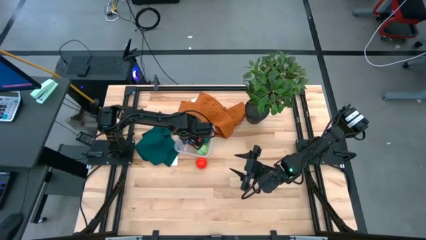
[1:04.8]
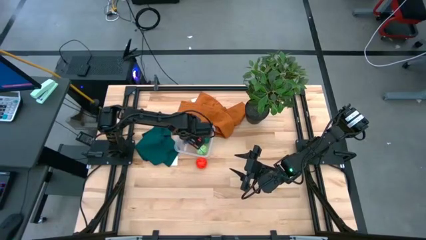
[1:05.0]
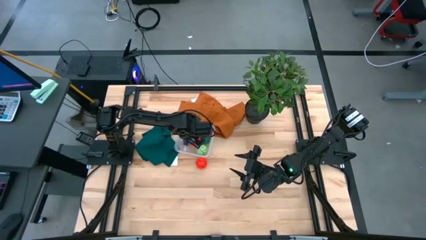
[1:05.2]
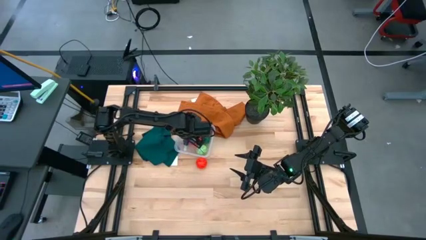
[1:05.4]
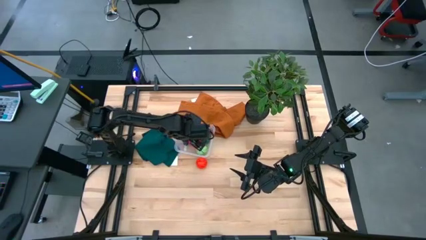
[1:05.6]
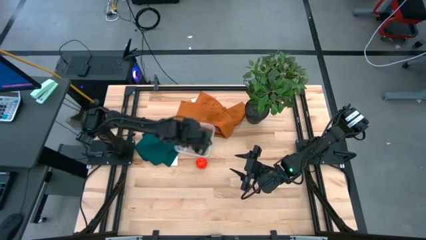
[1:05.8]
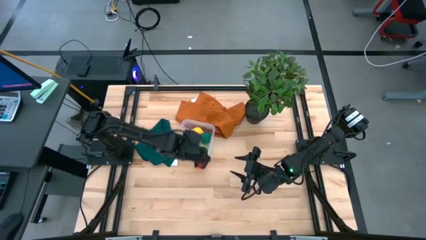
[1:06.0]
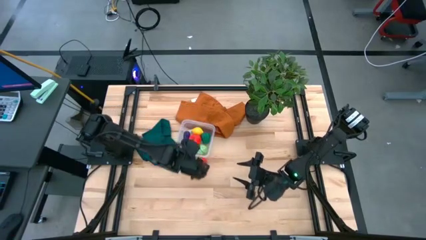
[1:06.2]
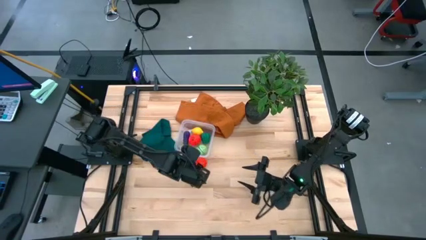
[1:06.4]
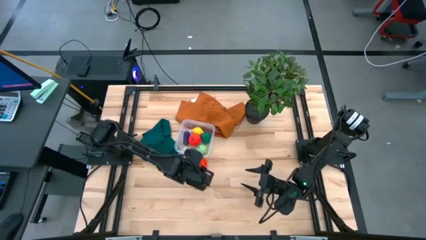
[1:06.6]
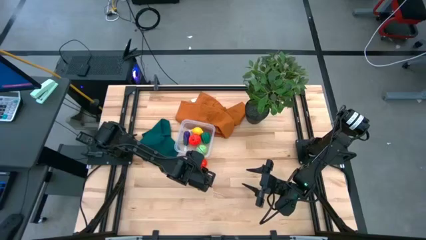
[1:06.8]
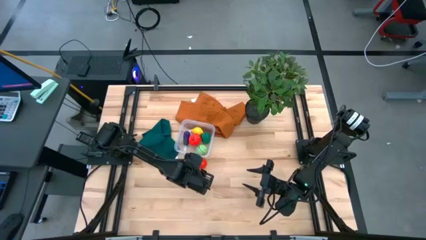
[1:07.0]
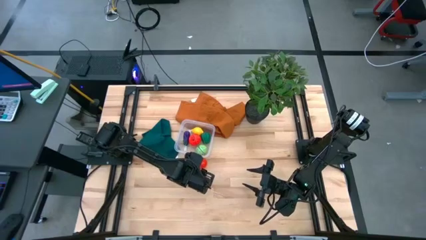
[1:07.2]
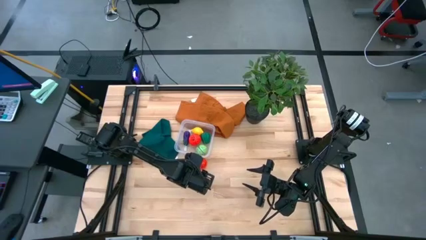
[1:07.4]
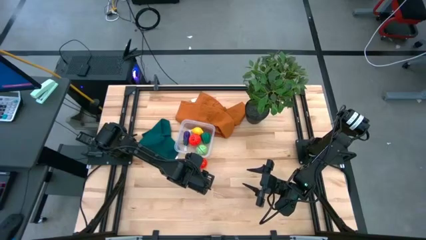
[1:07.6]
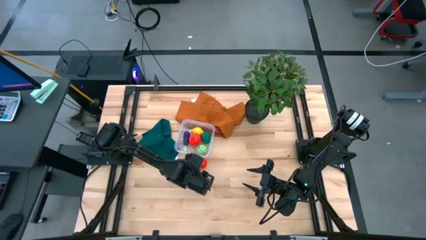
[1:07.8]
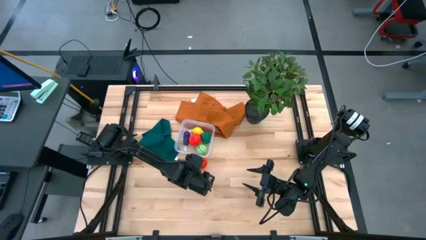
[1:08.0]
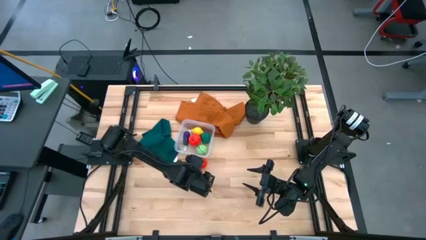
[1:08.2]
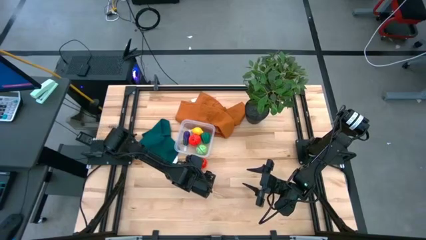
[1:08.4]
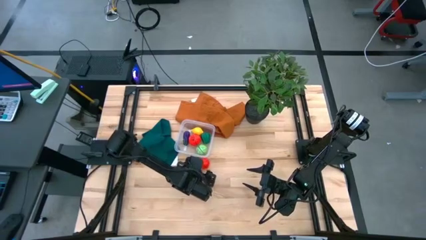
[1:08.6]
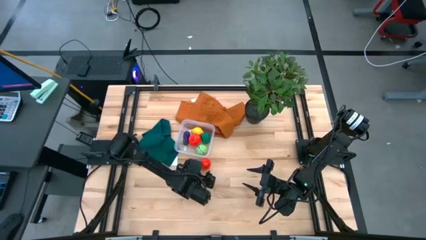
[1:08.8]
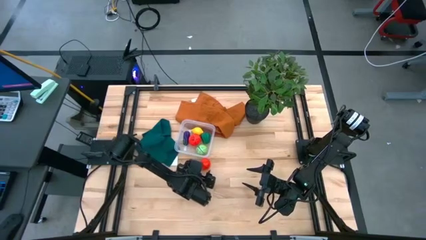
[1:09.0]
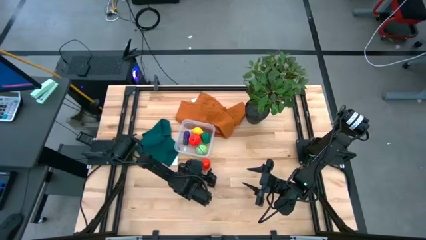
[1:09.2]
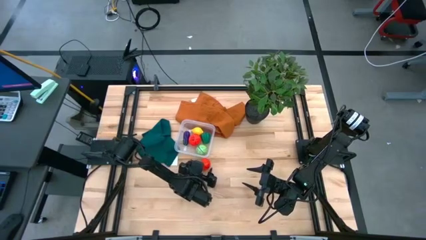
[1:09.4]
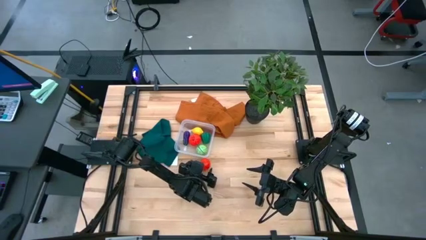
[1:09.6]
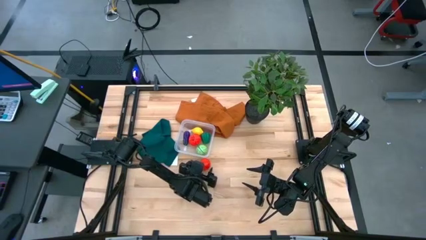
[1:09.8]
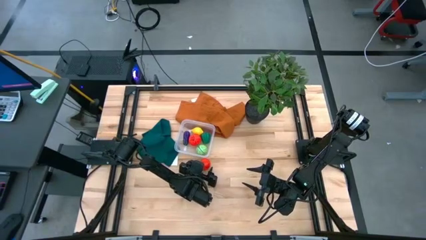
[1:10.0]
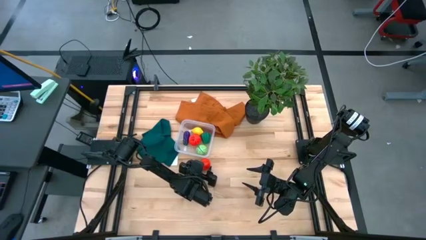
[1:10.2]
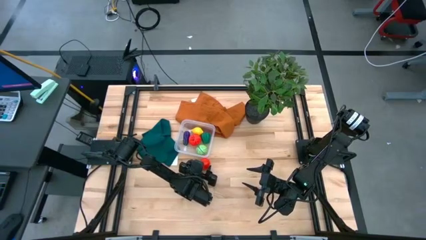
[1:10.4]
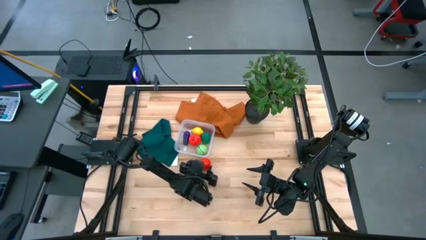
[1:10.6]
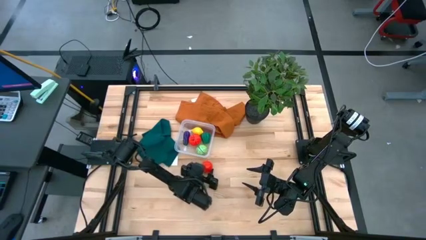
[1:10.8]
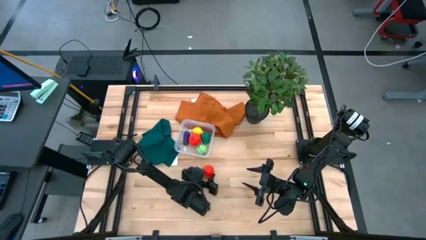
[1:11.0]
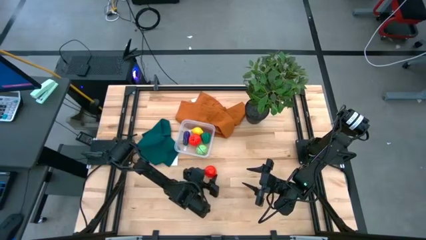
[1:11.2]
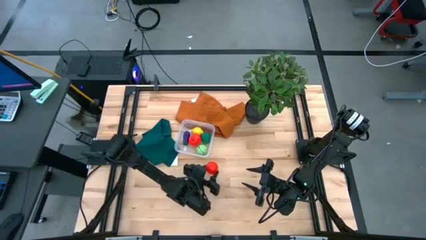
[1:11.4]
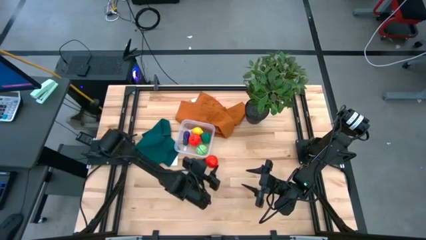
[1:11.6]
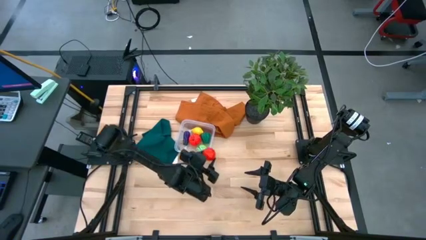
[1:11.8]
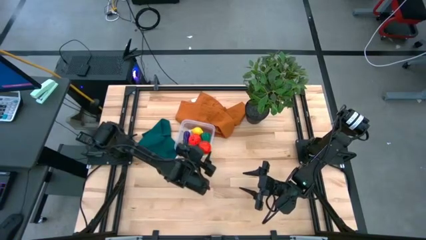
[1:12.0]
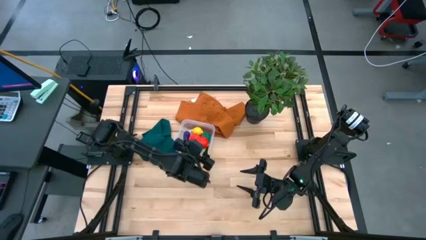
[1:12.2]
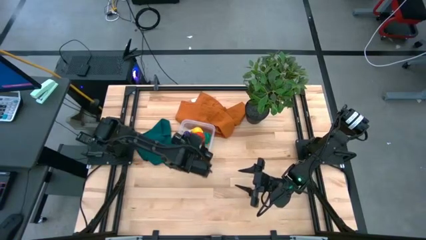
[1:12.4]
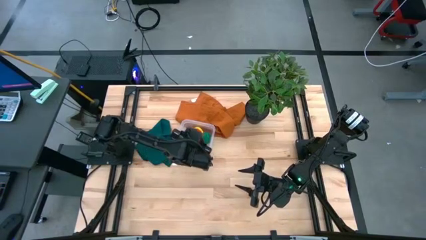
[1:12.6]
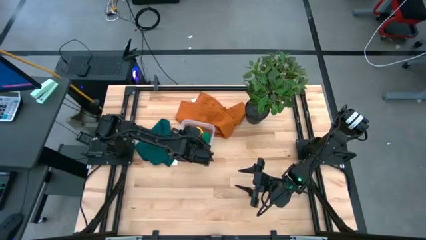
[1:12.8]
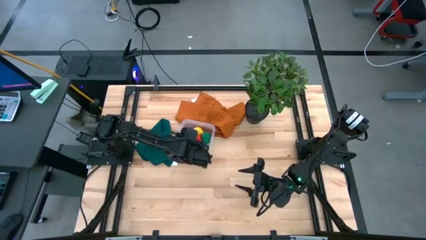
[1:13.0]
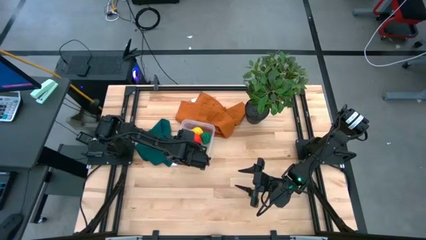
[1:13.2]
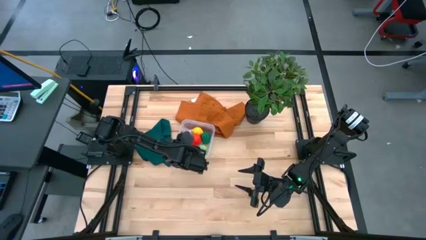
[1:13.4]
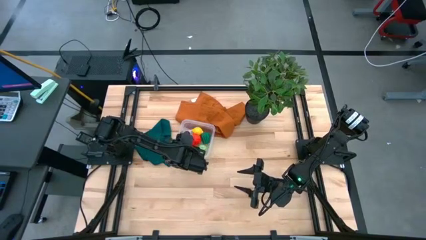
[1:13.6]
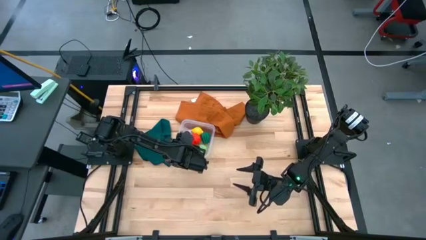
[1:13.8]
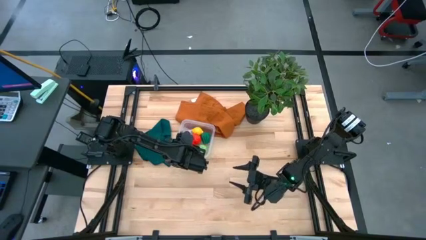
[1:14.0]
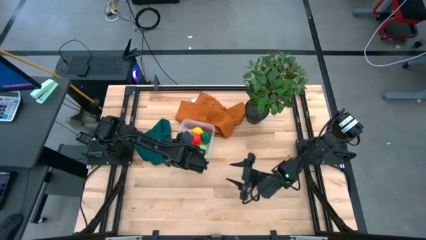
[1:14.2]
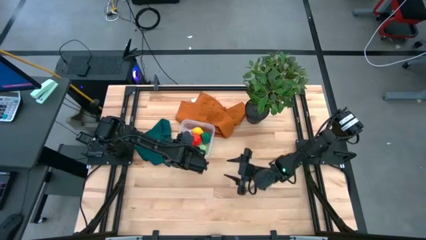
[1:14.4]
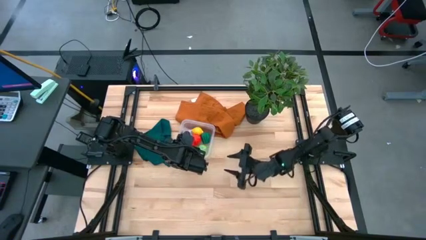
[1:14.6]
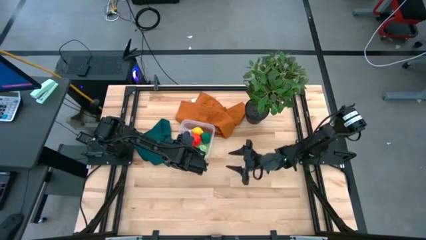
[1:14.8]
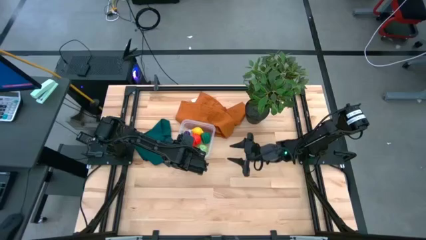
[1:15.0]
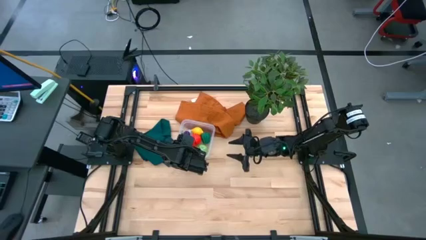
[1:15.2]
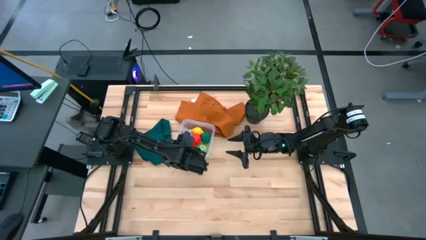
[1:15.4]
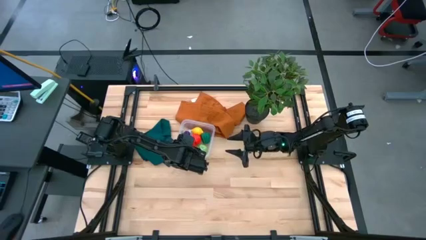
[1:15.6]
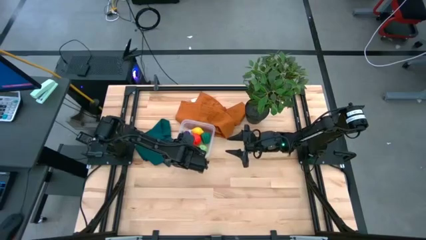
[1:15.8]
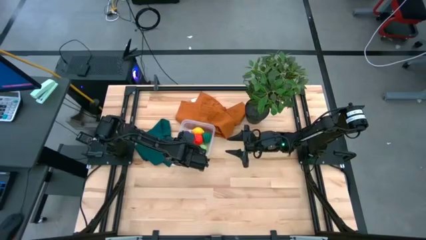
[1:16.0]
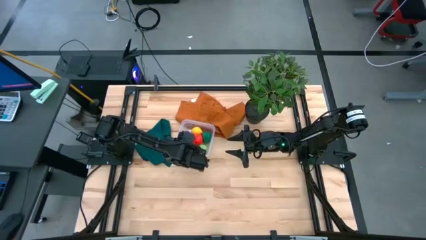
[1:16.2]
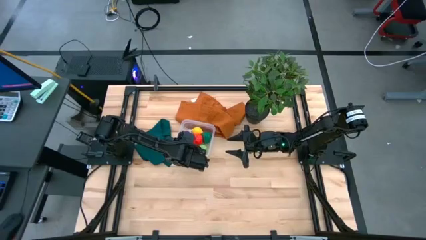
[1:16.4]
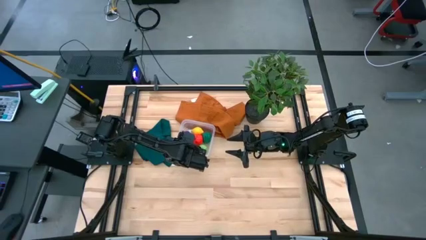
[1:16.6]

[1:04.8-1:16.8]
Task: Pick and placing Produce into tupperware
Put the red tomato into the transparent bin

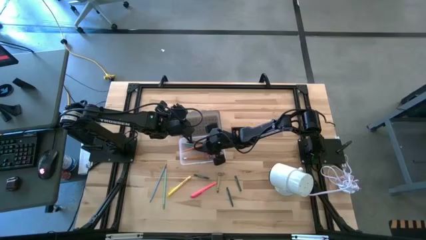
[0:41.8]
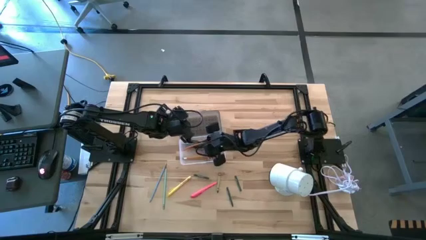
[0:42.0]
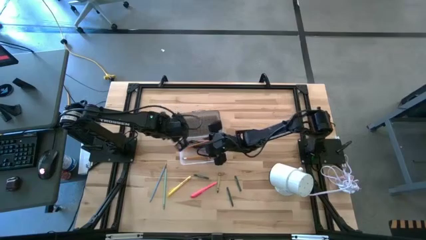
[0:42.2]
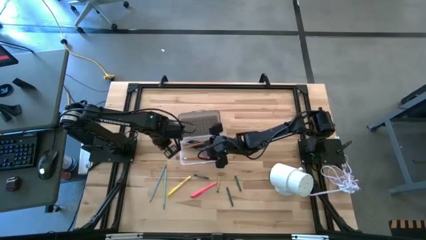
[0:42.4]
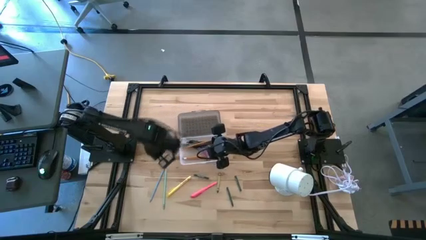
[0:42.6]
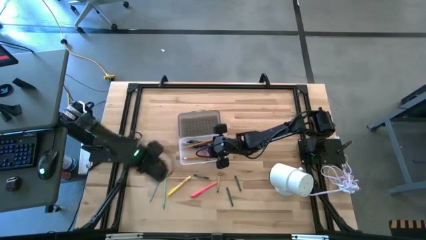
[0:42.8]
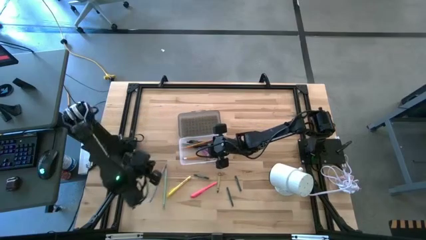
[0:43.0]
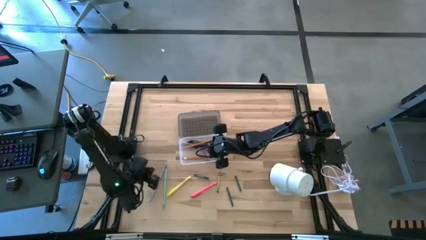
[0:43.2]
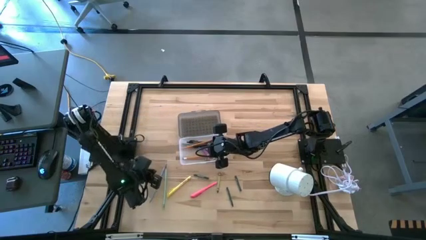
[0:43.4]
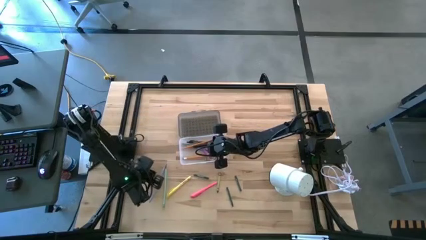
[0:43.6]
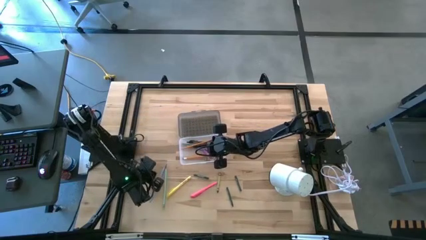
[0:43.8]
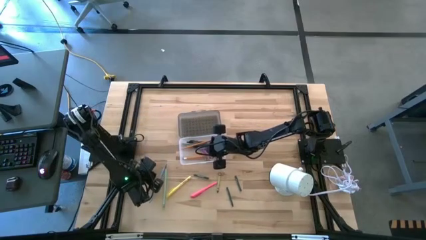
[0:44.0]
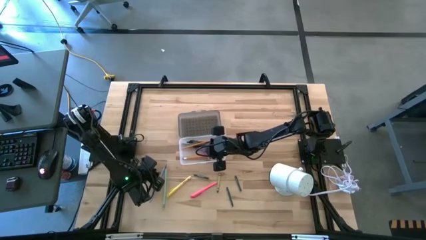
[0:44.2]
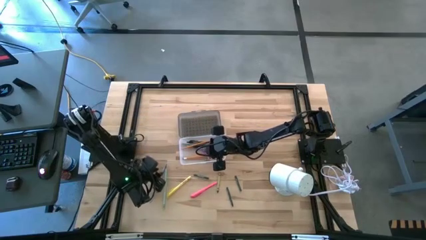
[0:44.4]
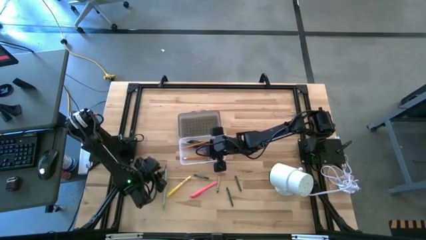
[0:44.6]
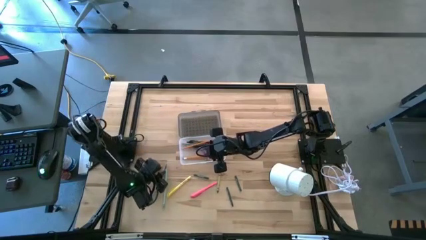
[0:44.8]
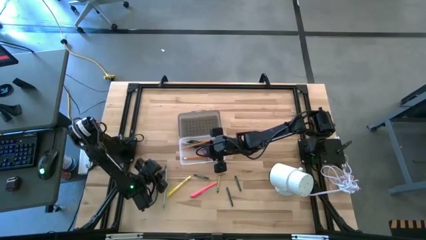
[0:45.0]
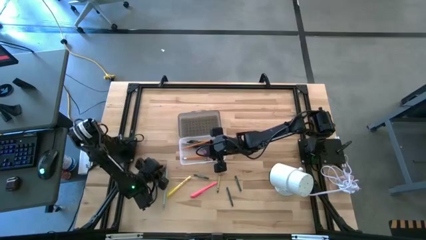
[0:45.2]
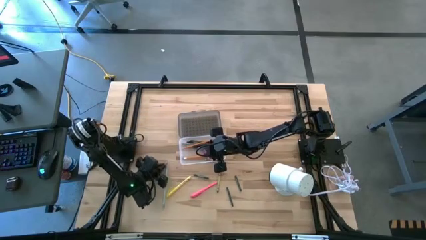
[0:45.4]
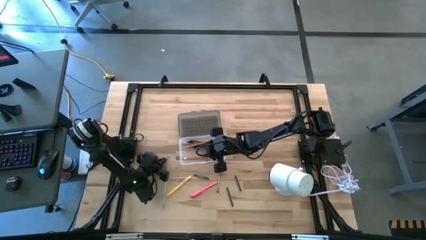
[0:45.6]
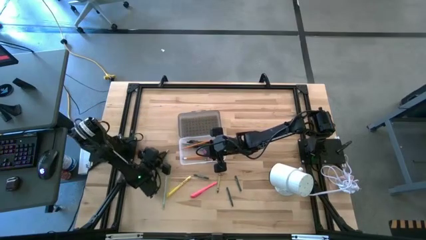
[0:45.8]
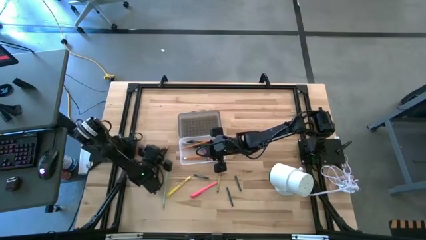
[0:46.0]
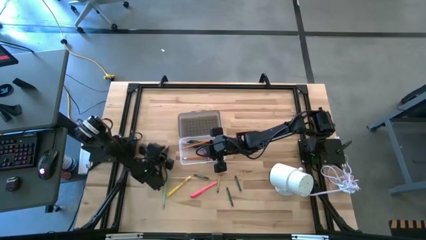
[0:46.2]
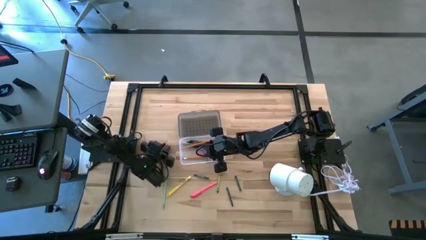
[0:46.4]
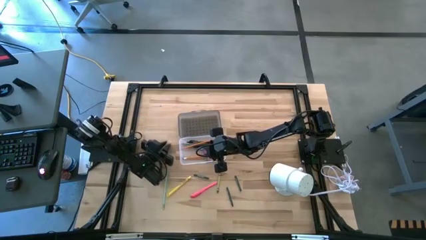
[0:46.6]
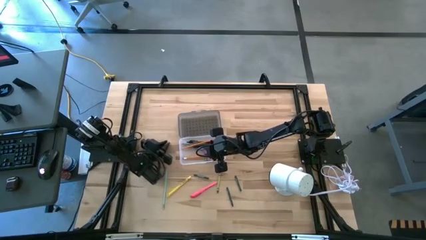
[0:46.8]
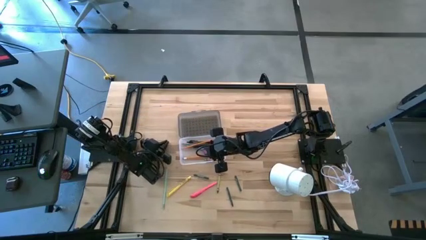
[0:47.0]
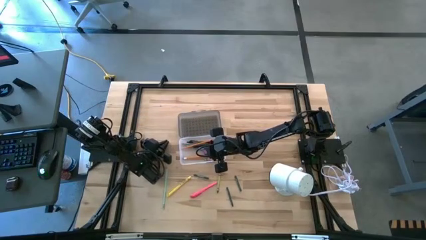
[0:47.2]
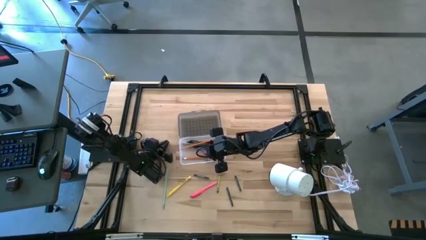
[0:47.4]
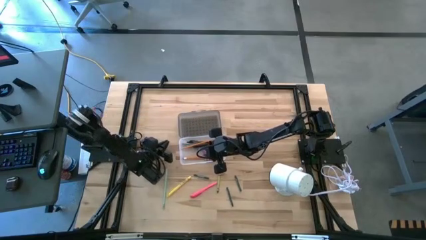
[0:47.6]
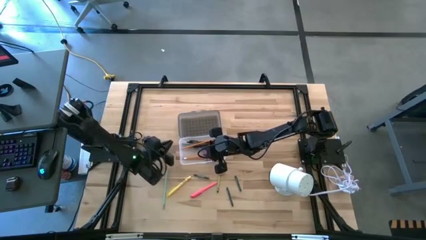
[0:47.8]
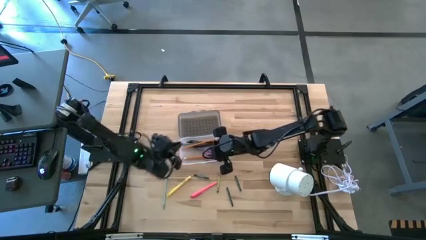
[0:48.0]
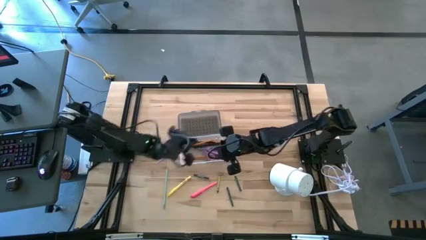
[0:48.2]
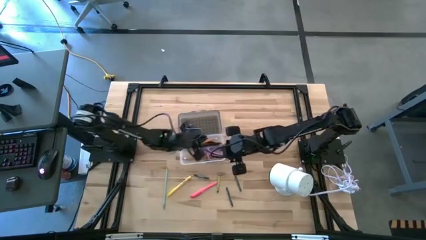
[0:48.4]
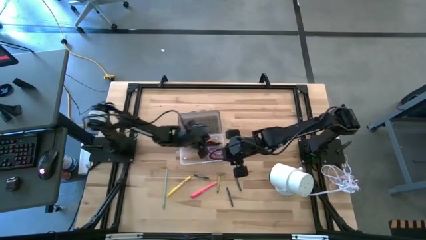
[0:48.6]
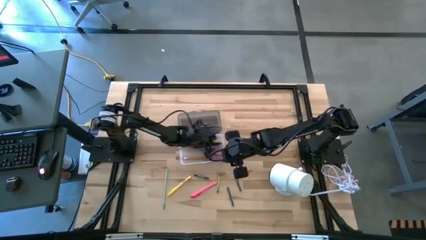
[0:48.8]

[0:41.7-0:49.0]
Task: Pick & place school supplies into a supply box
Put the blue pencil into the gray supply box
